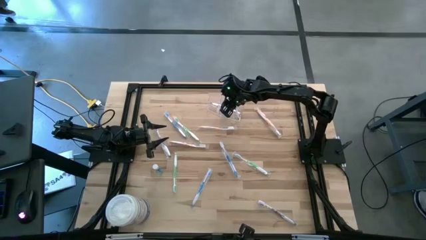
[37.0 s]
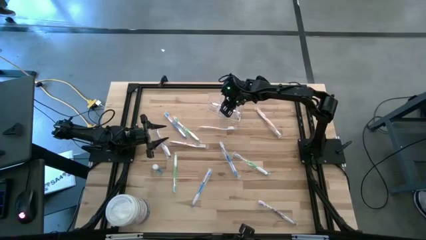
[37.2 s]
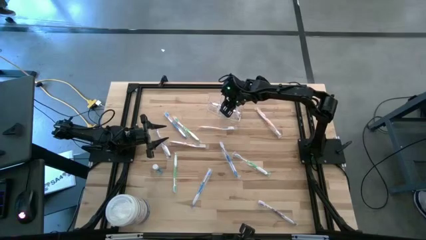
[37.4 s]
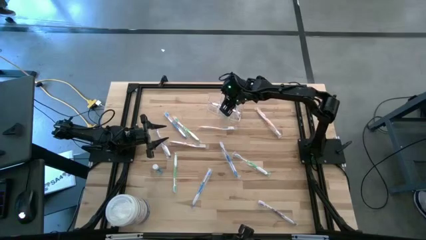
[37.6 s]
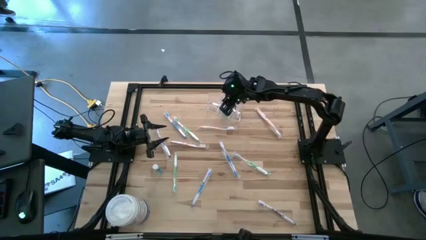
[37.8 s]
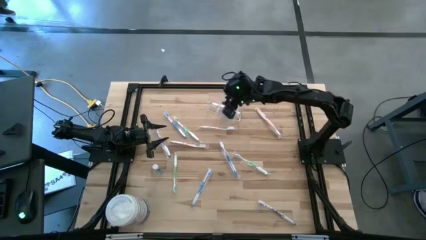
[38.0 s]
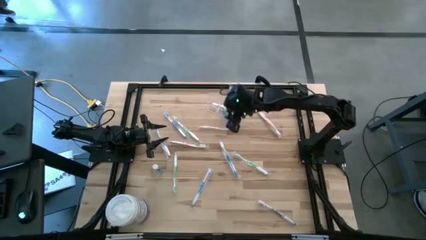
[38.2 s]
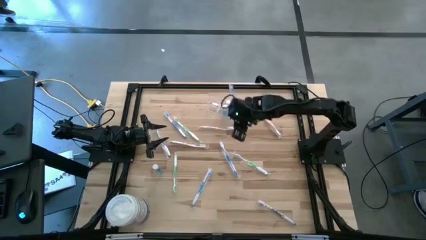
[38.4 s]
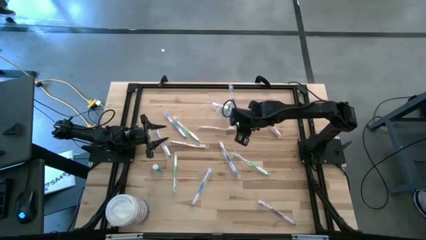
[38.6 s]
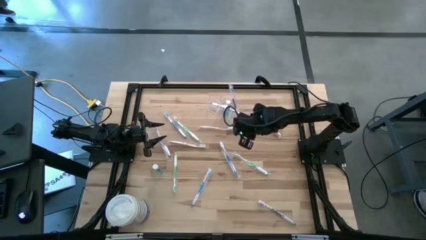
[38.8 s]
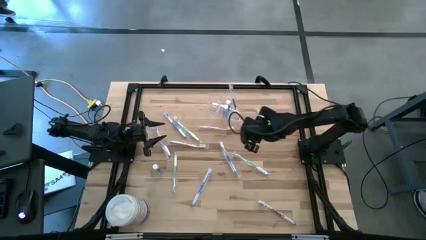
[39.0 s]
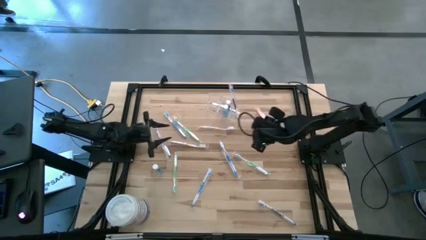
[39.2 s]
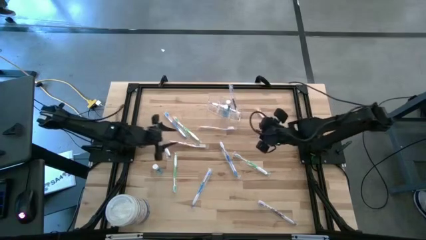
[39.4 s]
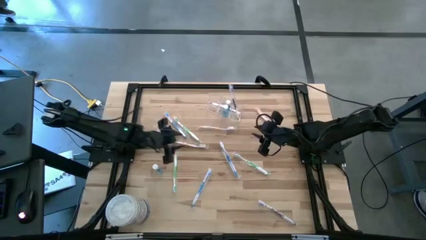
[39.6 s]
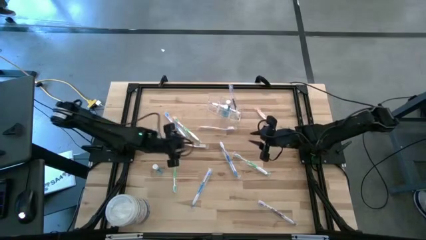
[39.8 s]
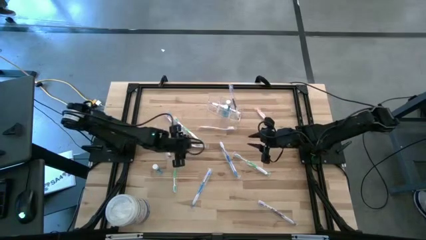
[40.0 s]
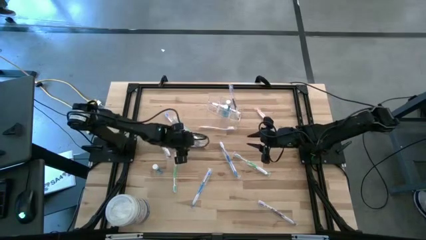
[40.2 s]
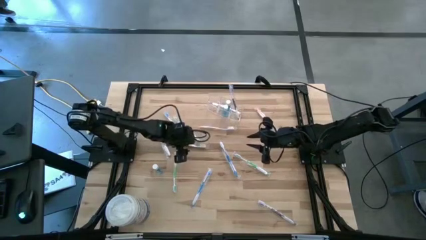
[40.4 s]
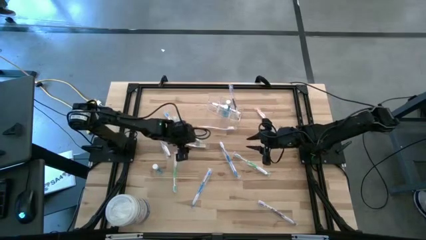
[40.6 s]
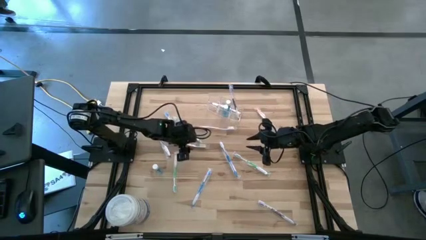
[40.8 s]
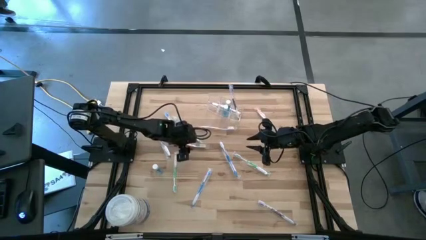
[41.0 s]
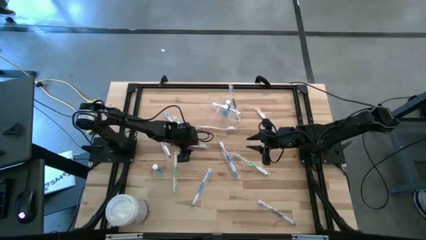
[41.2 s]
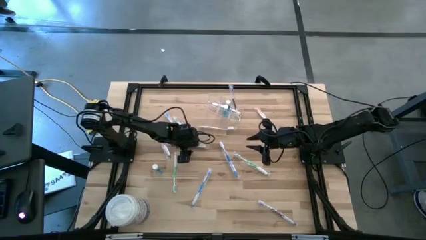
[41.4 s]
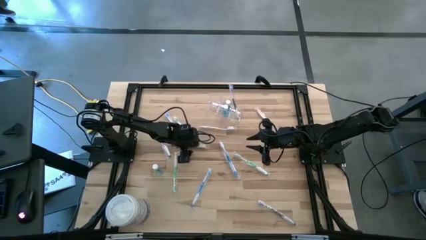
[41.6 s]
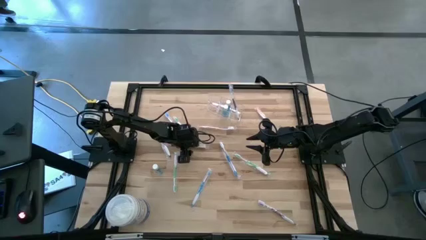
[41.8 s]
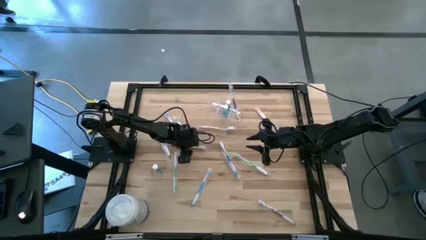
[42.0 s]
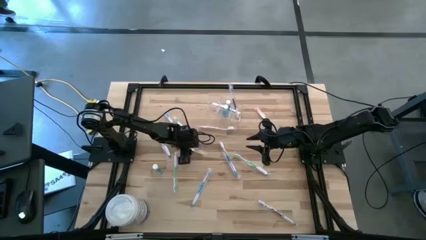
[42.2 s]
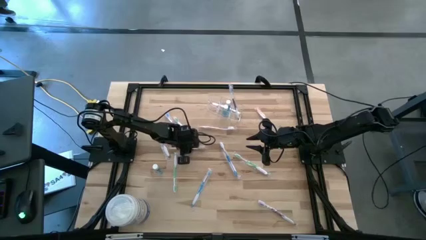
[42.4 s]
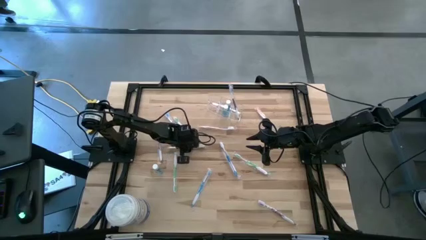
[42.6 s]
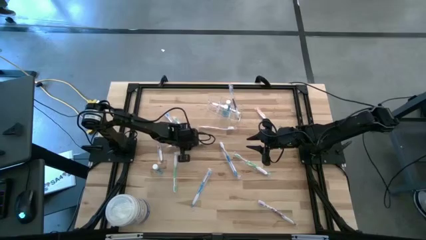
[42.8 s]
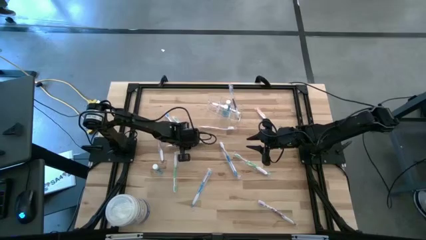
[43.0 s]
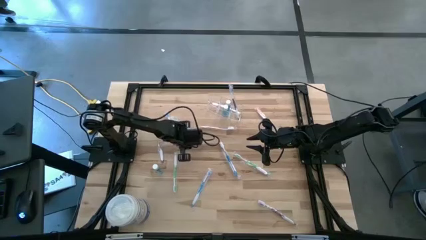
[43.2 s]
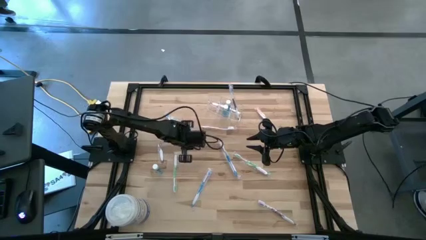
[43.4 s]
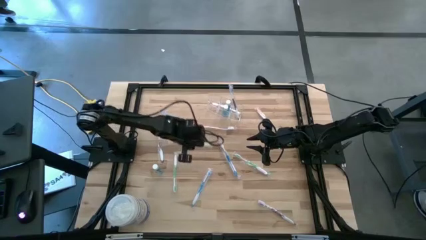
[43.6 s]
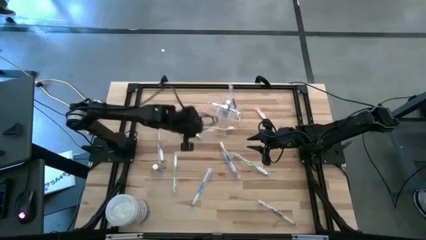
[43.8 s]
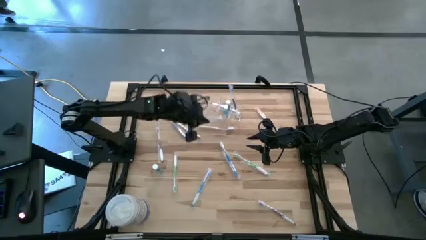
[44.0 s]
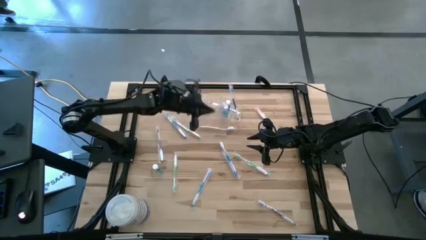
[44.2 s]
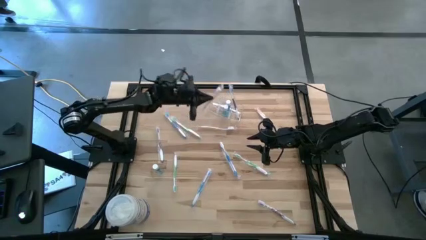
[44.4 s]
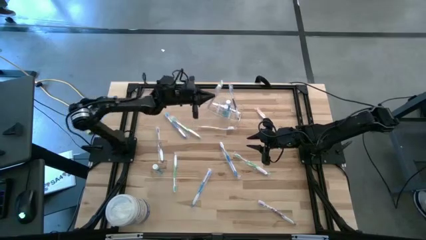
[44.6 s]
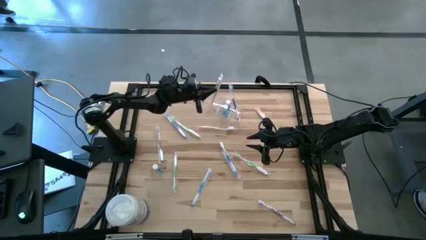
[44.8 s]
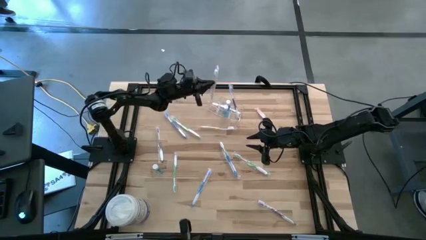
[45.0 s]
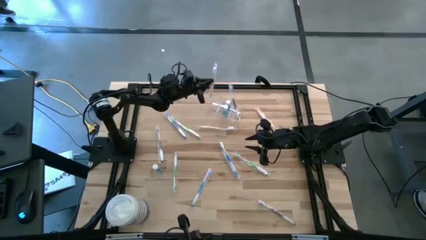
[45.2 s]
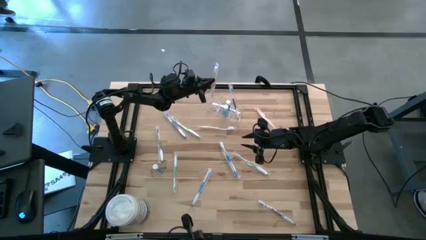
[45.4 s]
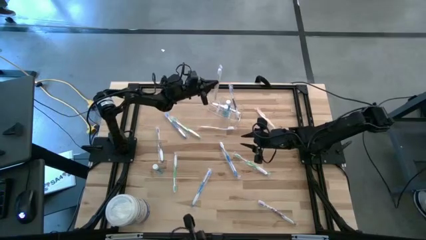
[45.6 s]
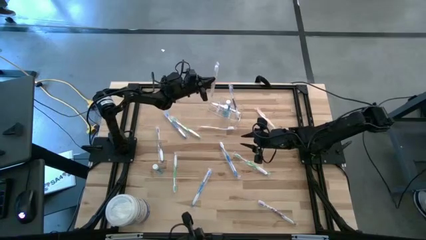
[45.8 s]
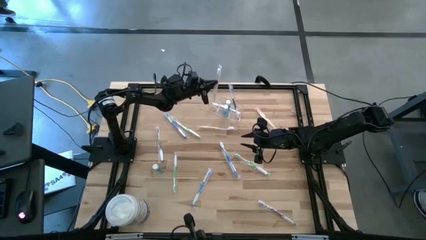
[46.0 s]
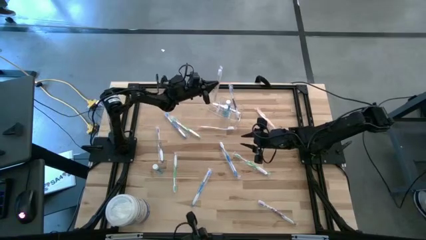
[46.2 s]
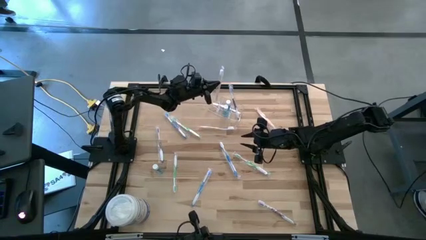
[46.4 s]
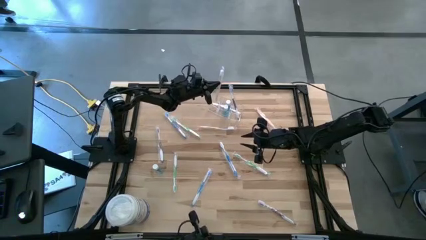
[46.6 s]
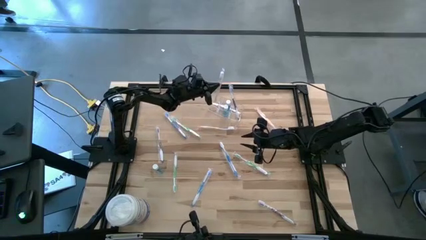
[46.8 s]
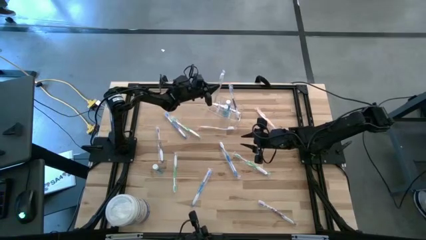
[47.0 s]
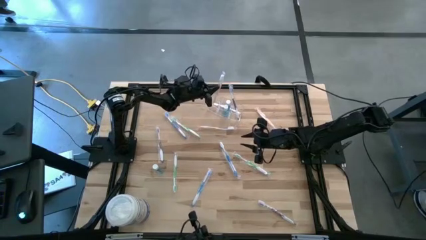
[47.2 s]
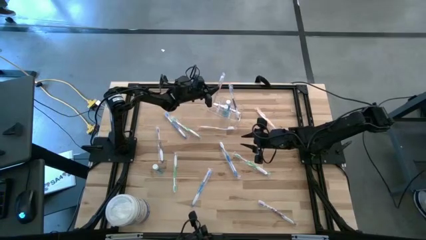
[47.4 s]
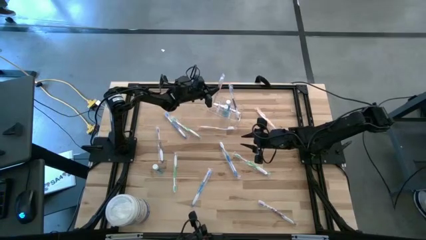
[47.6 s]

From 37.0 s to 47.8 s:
Task: Pick & Place toothbrushing station
Put the bottom left orange toothbrush into the transparent organizer

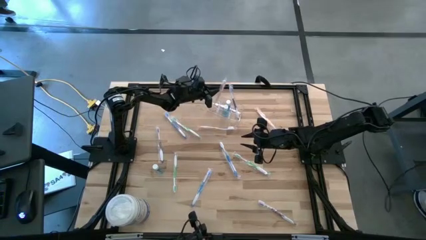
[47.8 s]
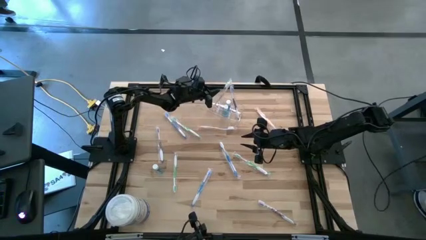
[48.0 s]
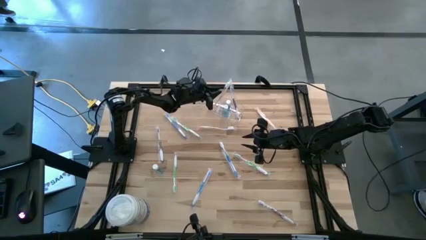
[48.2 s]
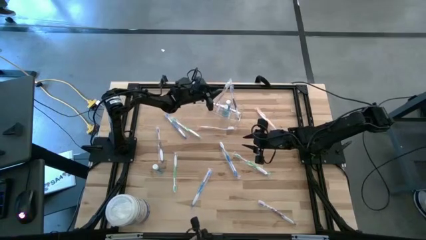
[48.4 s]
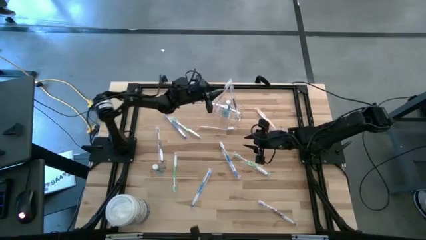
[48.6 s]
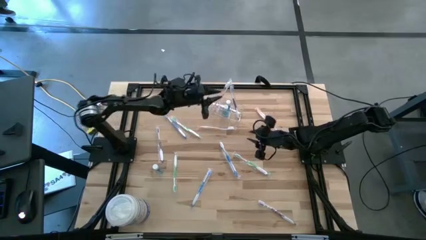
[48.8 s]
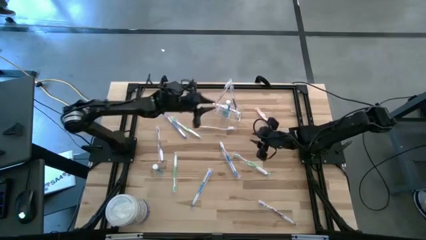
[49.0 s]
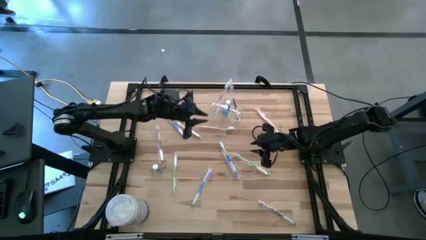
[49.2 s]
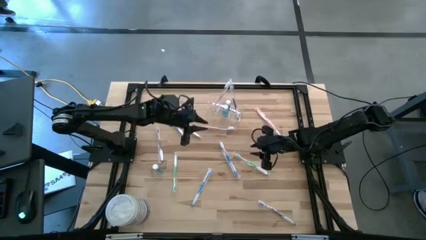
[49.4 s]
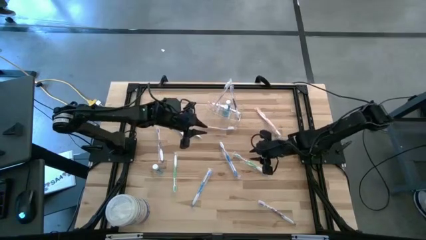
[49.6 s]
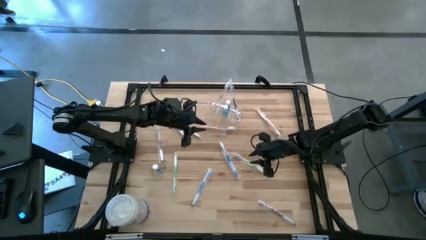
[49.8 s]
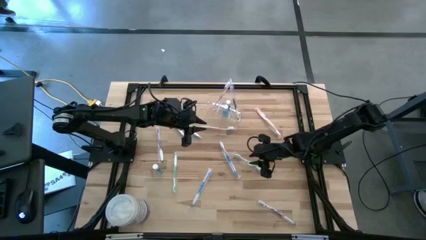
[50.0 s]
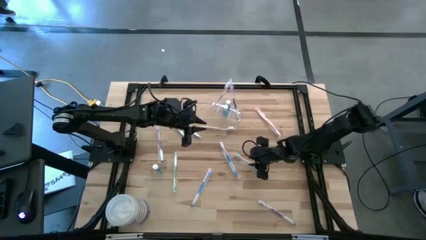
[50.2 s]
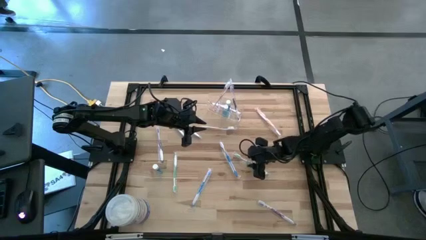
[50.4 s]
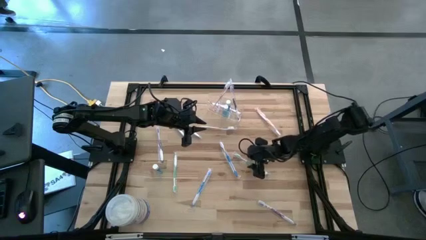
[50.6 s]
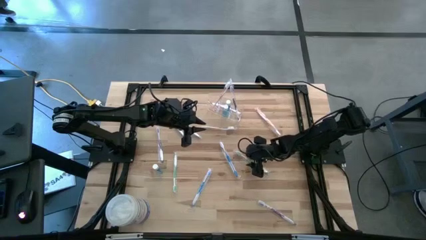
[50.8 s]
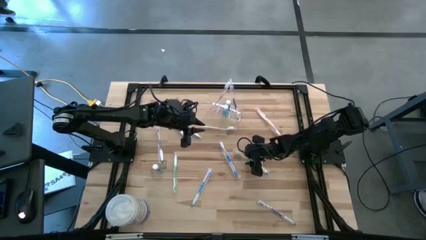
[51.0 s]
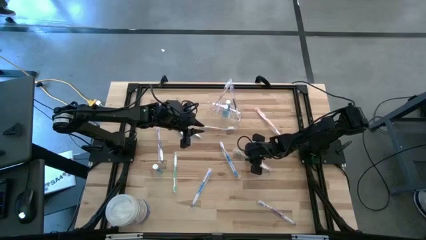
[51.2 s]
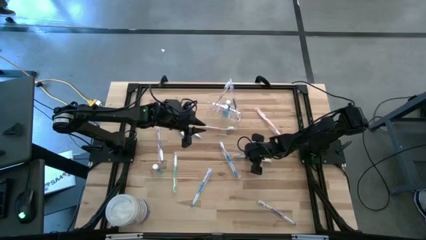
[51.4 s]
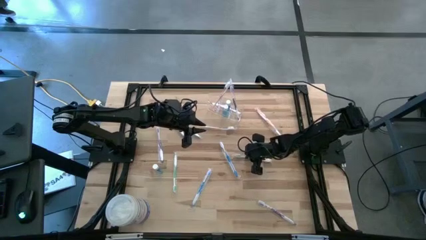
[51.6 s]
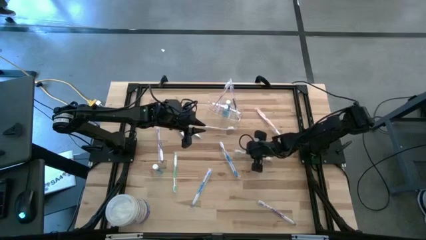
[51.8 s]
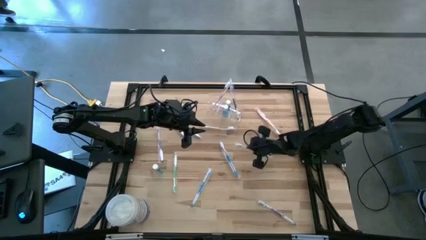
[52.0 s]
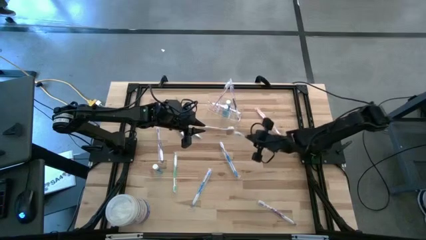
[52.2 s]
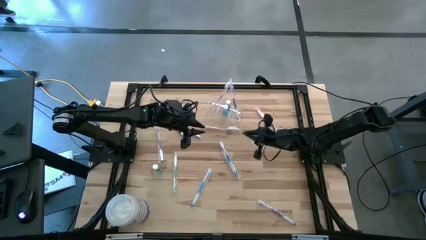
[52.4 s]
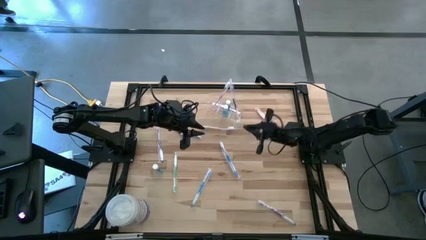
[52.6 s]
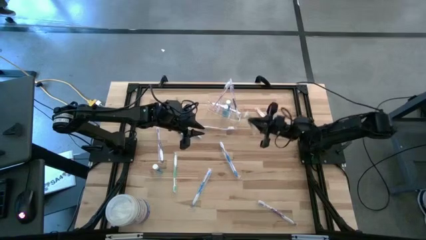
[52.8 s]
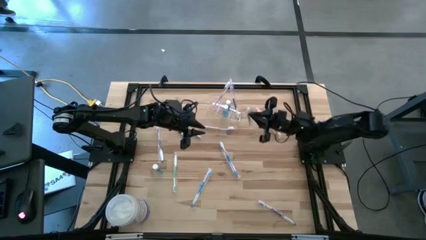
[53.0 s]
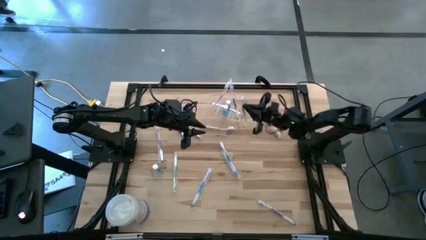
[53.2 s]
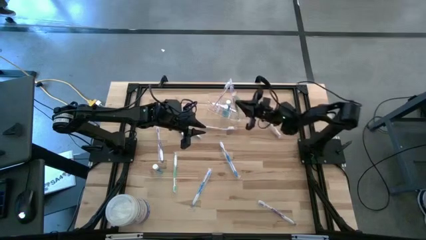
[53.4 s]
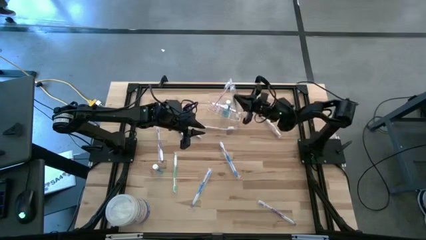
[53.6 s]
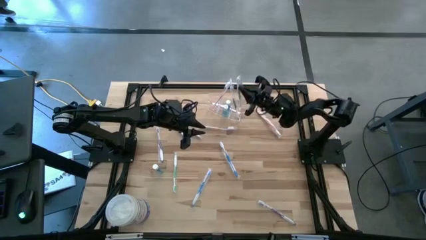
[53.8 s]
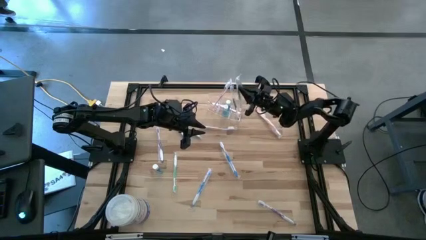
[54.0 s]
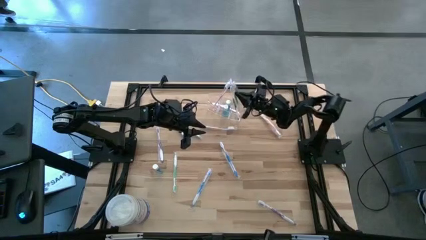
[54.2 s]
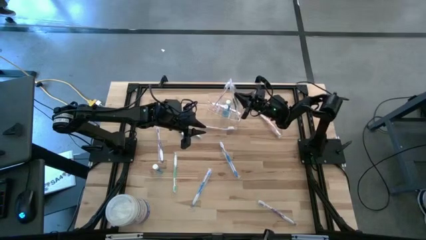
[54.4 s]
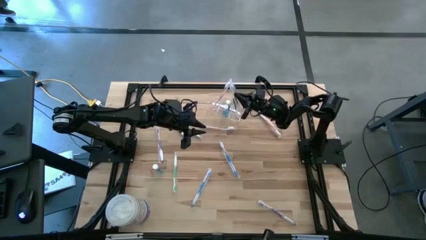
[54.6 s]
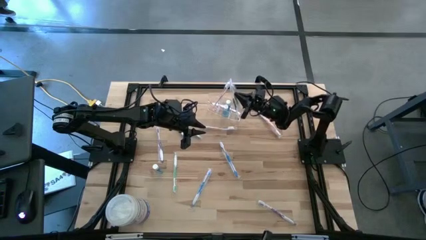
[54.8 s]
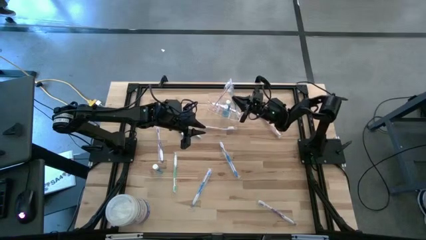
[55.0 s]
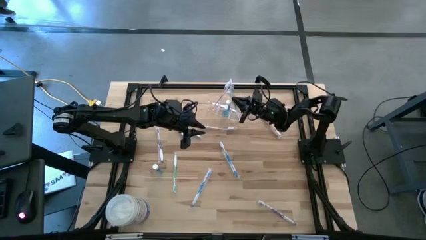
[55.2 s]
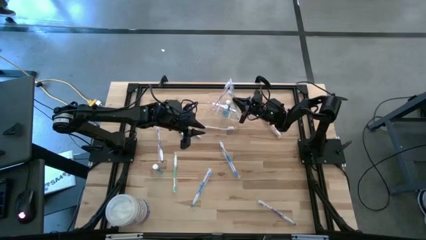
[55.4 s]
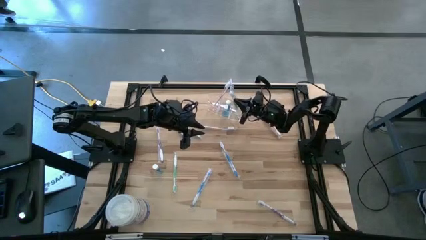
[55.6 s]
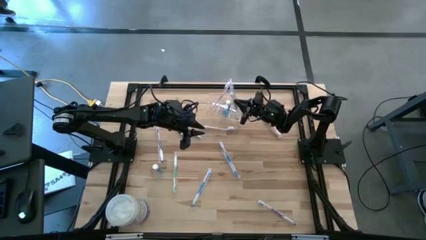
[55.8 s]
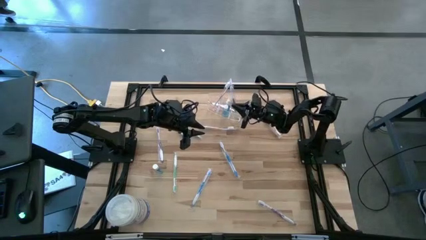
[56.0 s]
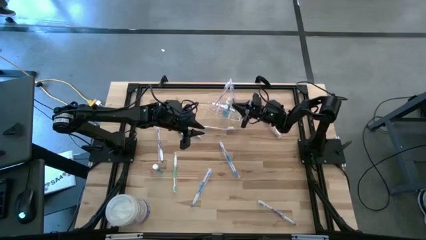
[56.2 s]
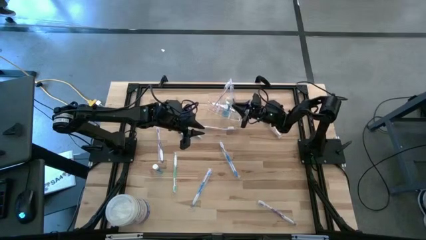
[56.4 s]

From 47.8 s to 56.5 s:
Put the bottom right green toothbrush into the transparent organizer
